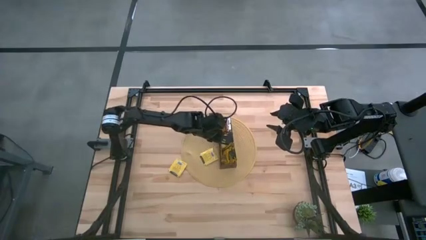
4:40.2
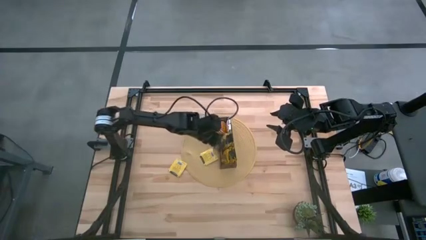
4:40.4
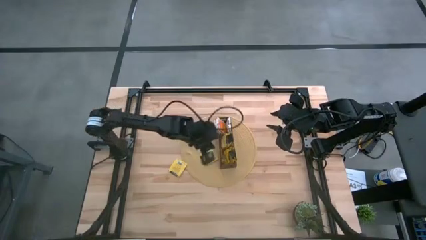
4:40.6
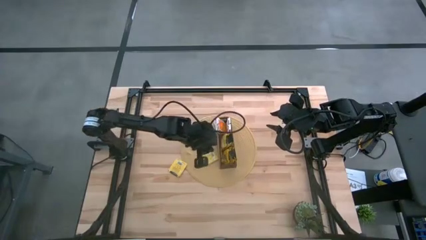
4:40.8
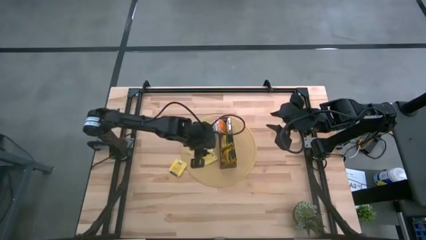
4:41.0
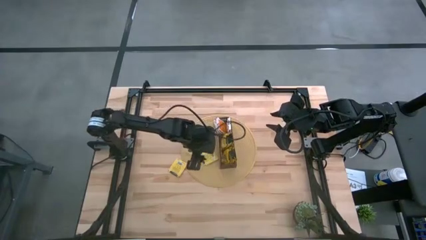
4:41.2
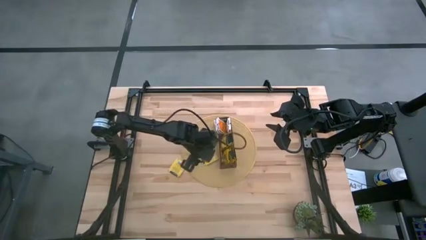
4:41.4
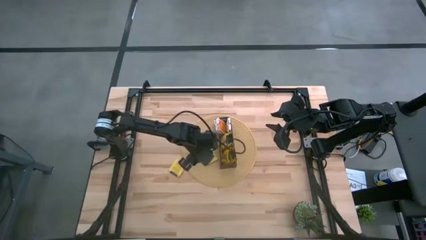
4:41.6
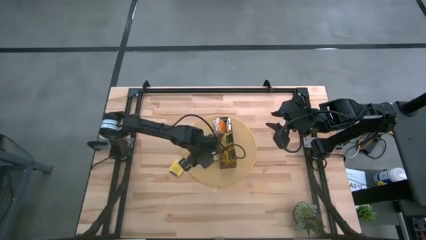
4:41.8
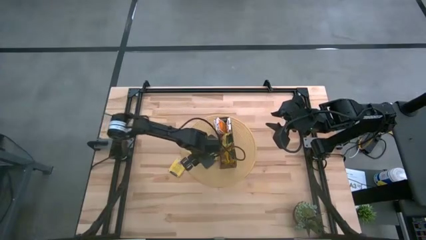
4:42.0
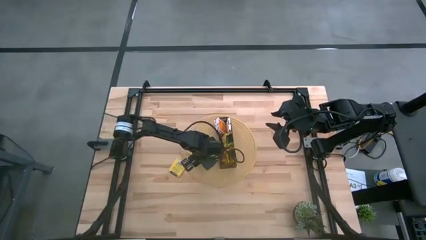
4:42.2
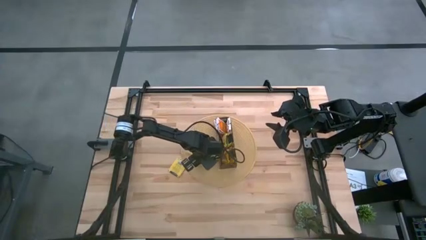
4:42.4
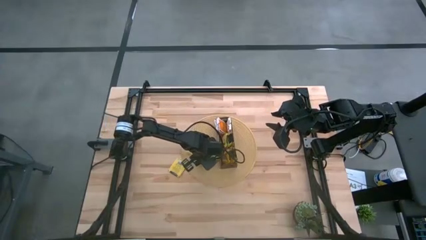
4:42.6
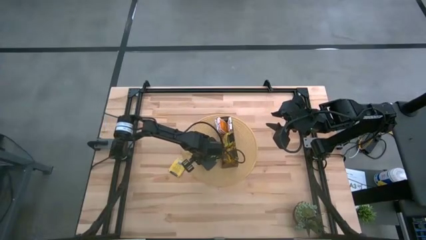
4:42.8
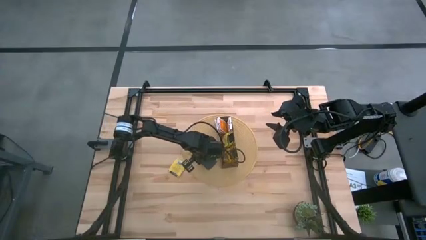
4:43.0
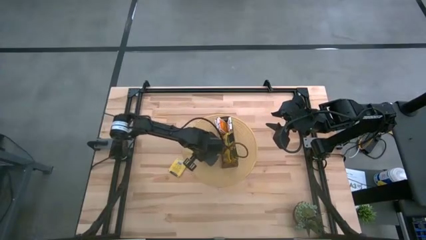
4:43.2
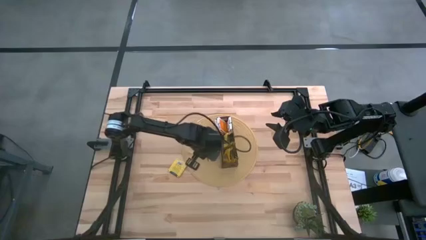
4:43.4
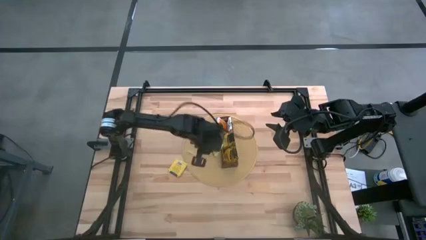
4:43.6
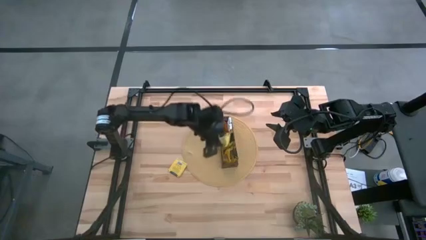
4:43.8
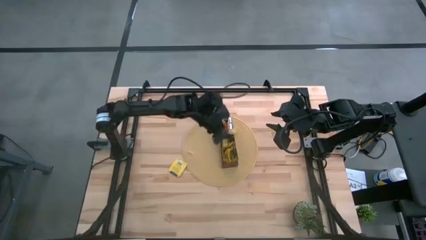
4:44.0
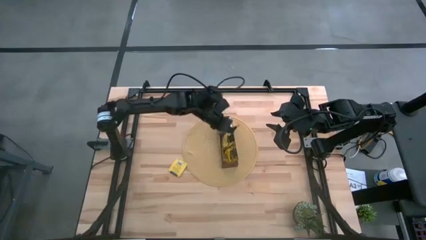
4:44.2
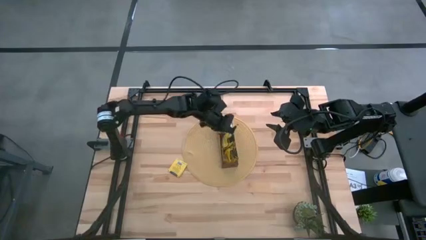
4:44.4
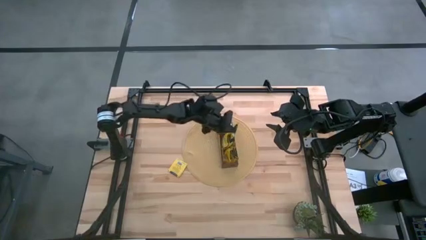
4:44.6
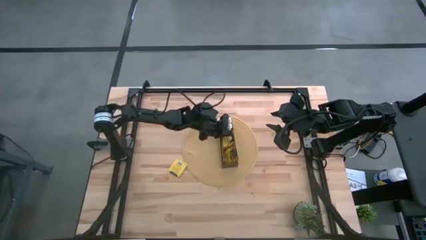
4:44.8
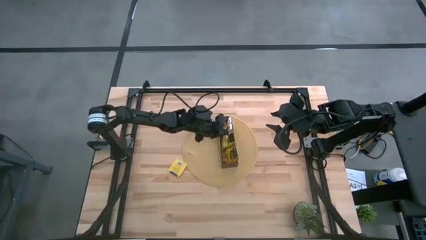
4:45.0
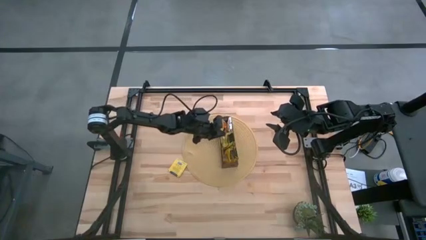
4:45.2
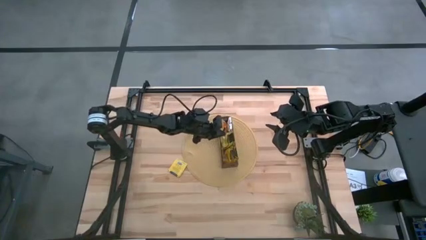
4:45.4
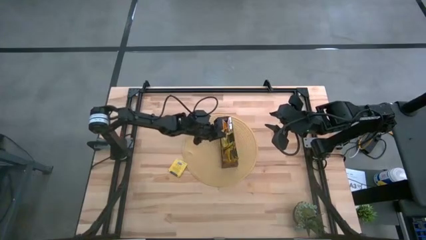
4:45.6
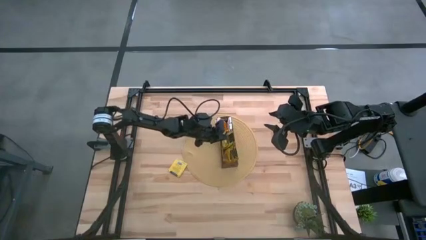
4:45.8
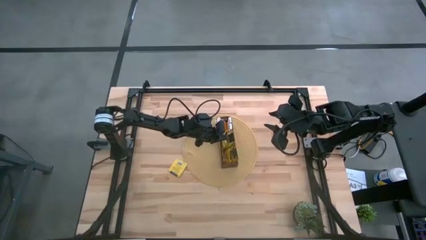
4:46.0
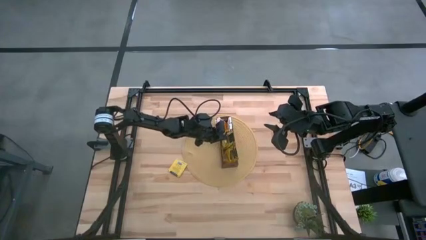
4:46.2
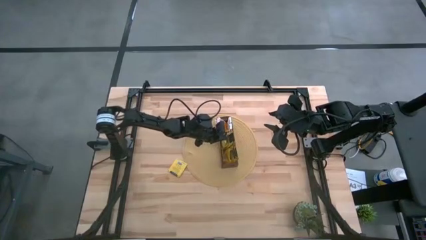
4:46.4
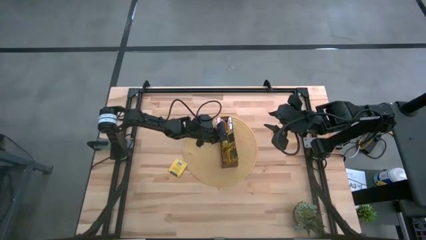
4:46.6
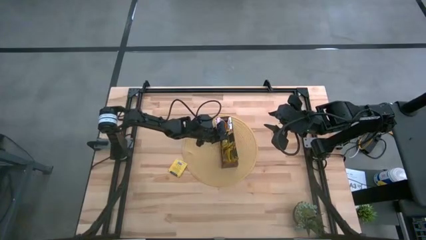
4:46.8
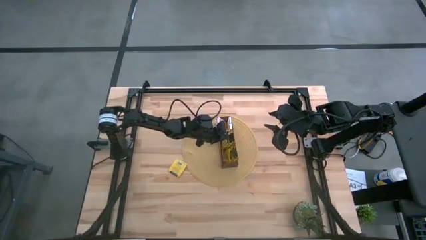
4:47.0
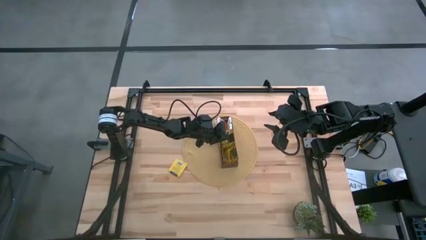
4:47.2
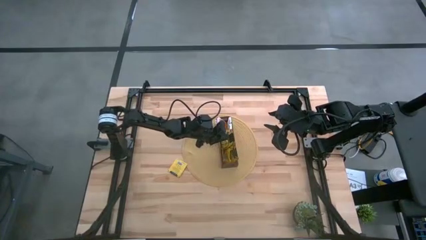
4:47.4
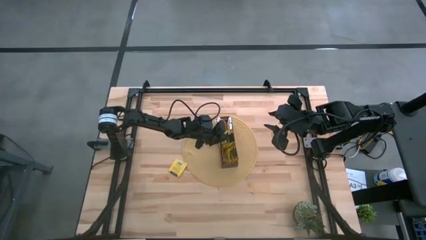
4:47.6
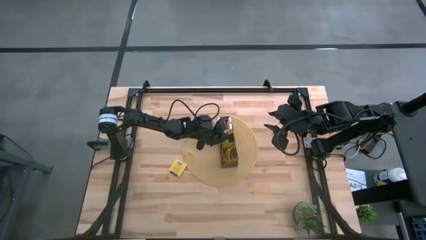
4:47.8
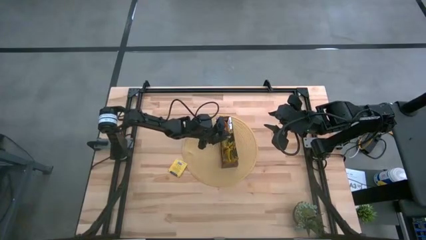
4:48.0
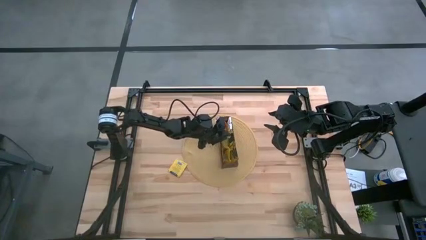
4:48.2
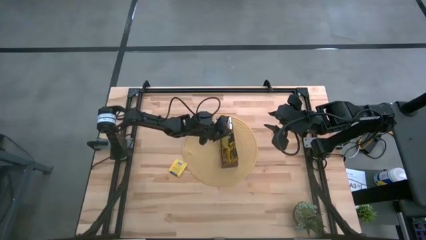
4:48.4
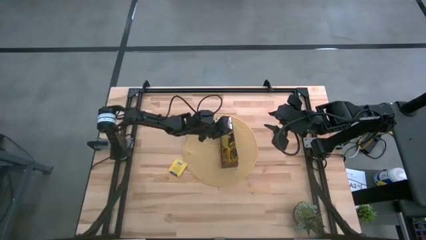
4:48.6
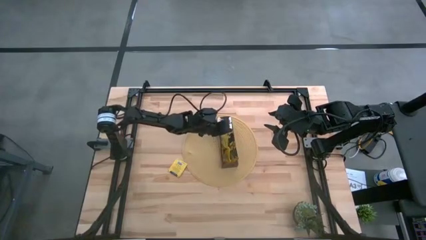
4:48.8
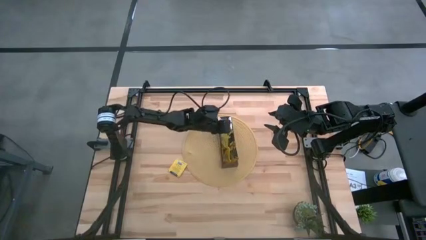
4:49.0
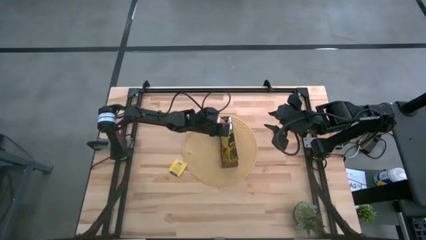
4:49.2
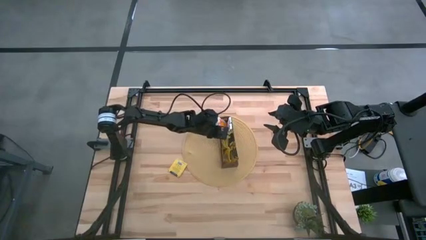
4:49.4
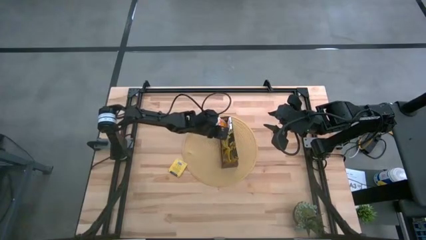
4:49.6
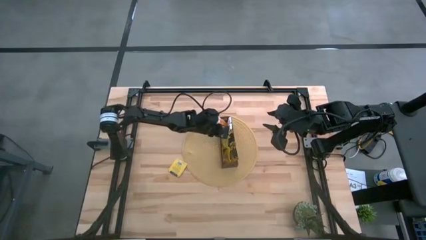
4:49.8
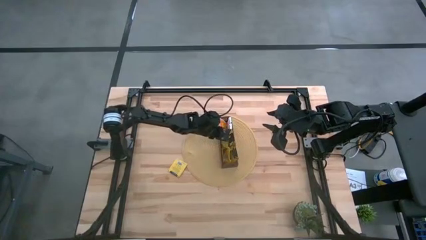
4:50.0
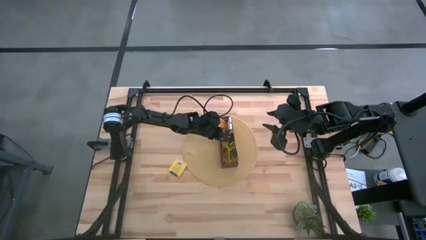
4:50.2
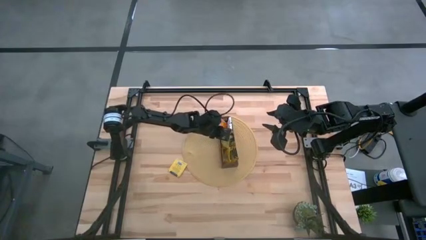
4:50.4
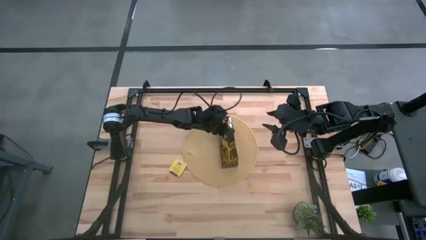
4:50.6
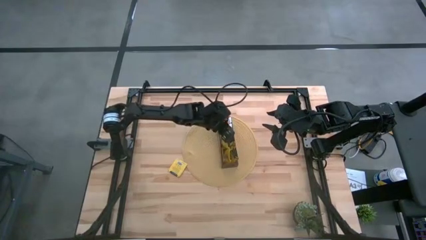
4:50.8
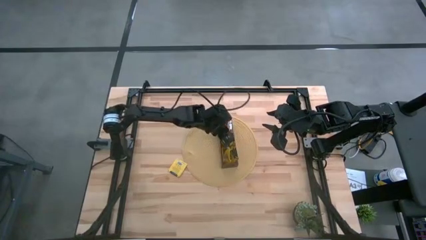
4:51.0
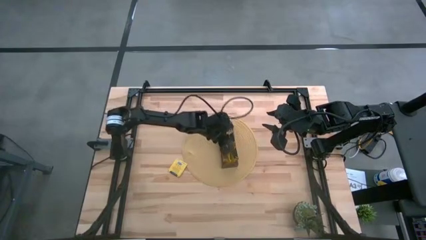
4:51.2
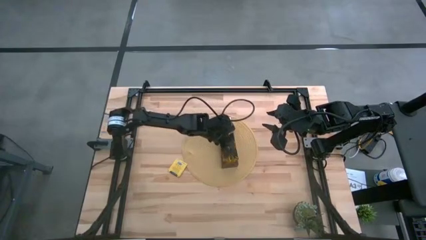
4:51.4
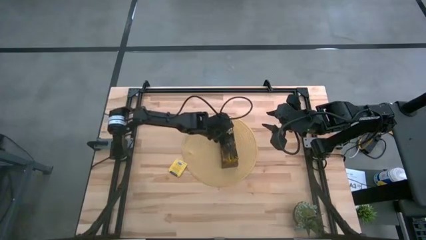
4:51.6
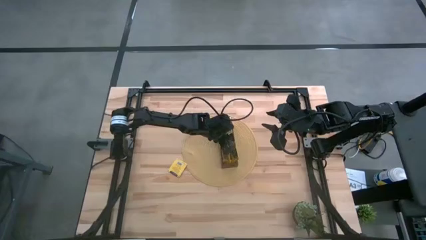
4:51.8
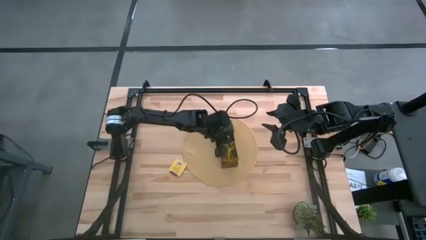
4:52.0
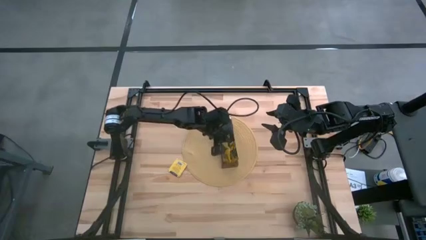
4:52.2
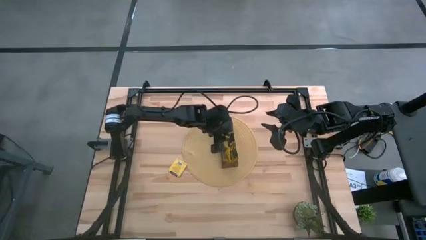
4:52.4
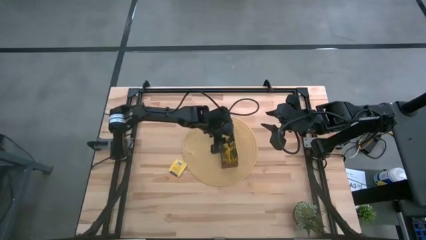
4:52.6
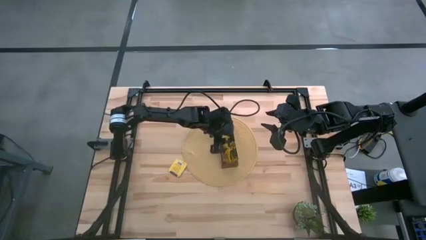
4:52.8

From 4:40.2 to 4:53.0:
Task: Pick & Place Tea
Put the right yellow tea bag into the middle section of the wooden organizer

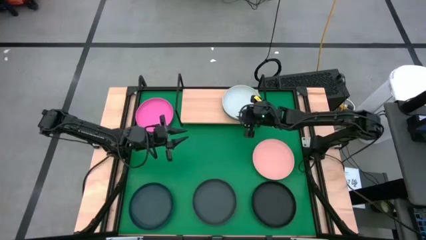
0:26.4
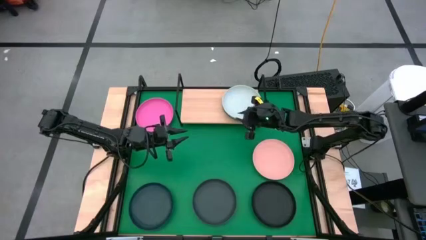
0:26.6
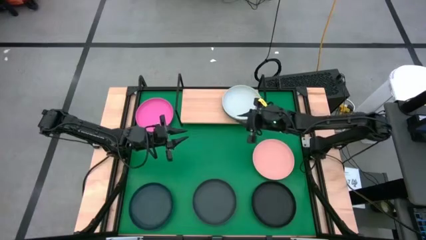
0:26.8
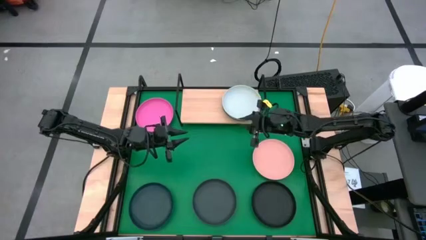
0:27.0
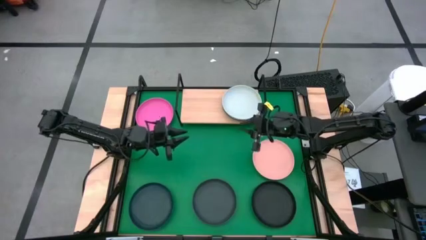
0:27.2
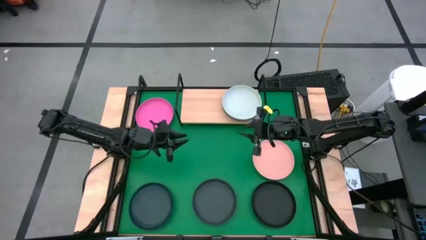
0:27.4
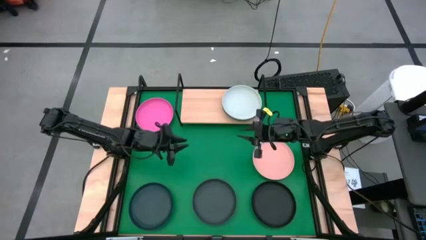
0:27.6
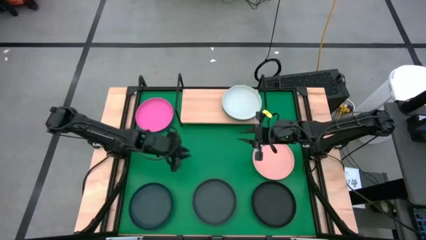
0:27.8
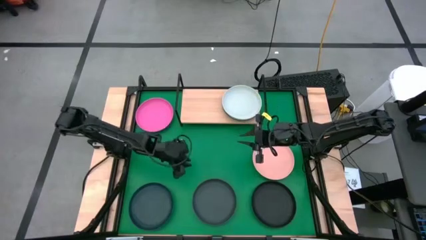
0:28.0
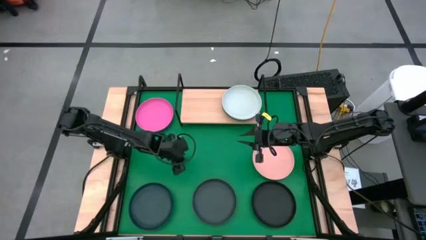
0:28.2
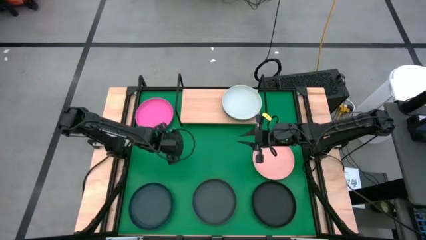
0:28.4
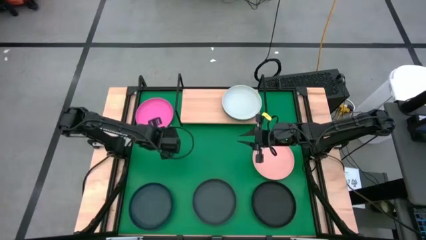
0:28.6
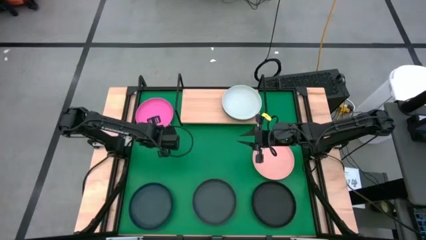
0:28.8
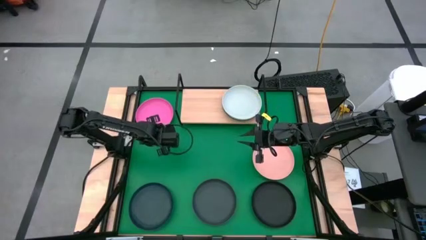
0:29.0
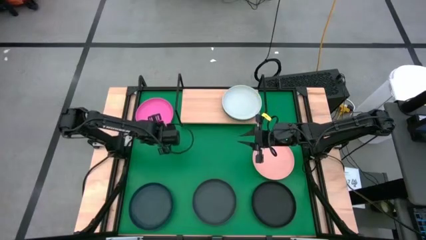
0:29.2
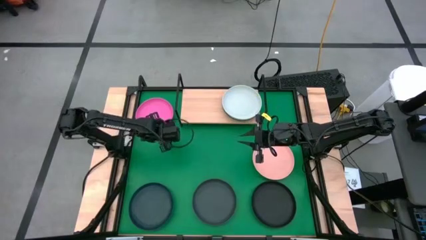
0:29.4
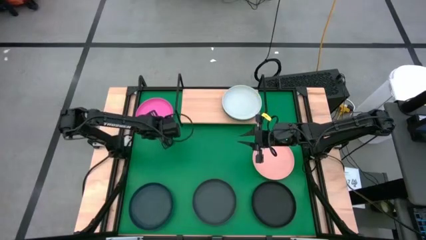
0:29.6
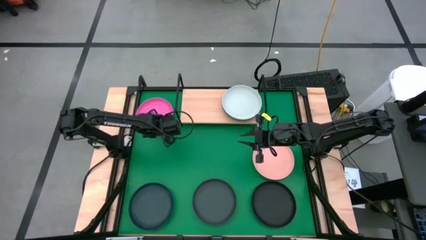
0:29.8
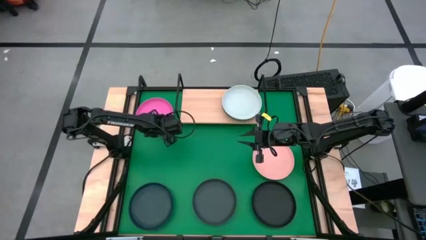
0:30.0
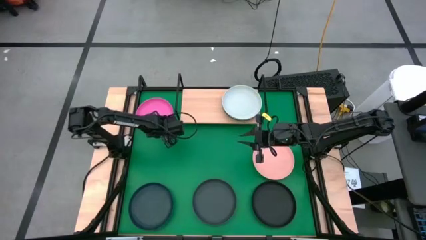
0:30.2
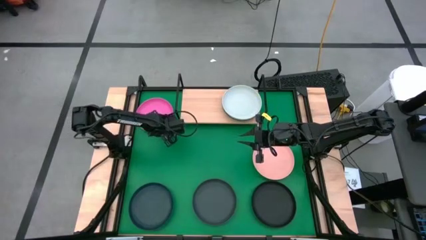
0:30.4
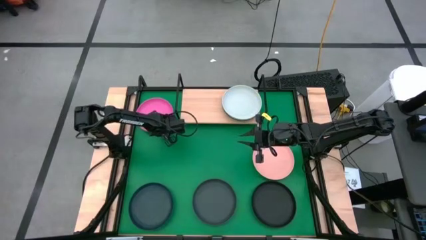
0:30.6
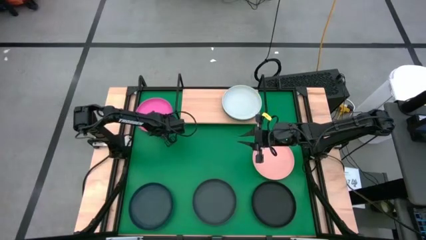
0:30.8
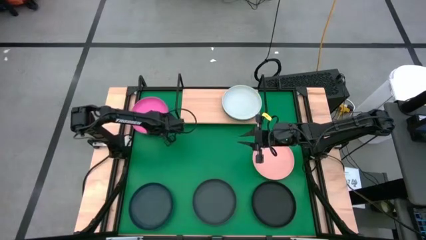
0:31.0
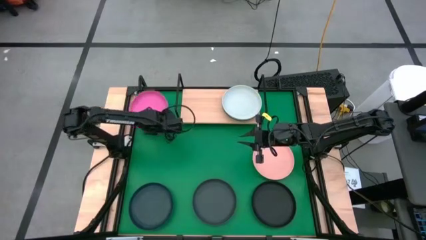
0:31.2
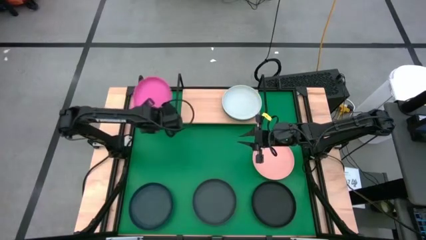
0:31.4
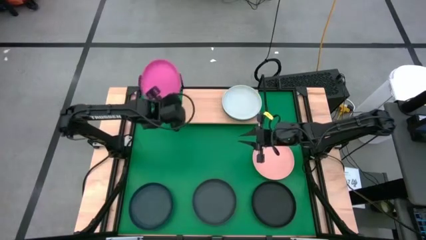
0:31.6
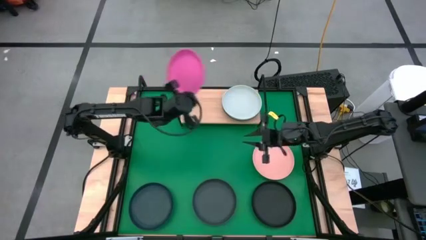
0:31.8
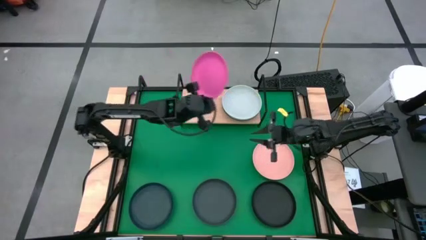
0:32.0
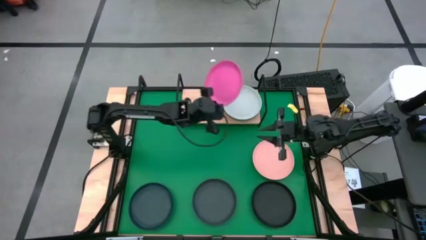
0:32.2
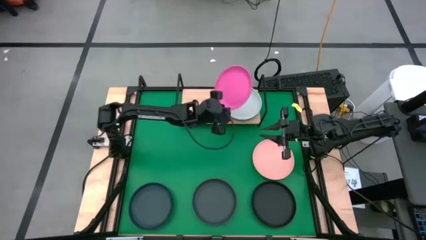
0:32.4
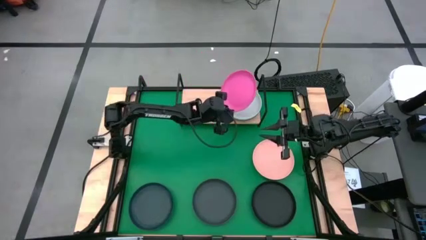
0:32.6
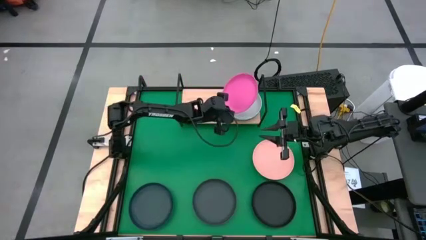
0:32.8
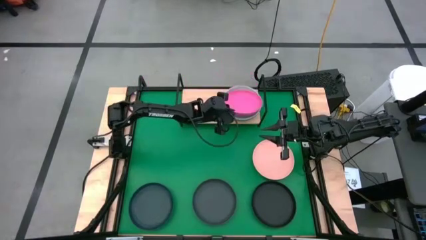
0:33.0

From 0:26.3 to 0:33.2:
Task: Place and stack plates onto a shelf
Stack the pink plate on top of the gray plate on the shelf
